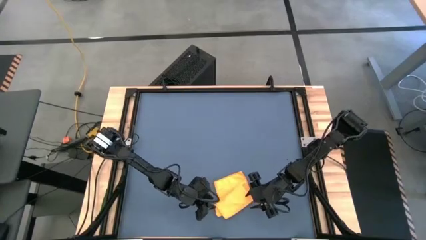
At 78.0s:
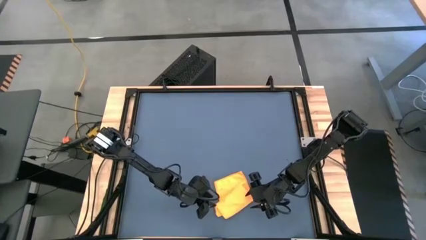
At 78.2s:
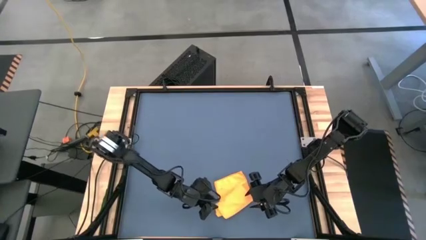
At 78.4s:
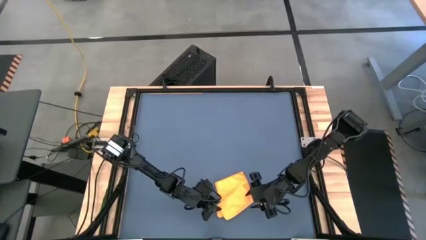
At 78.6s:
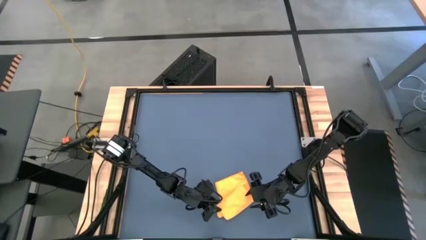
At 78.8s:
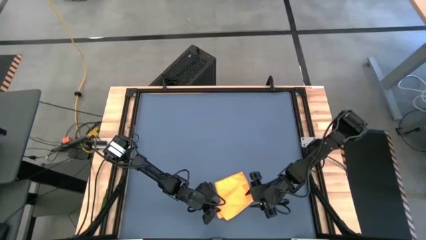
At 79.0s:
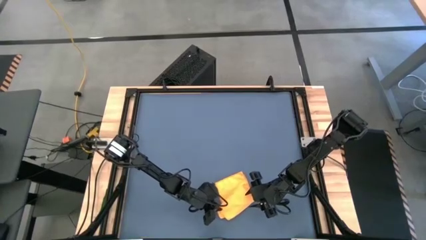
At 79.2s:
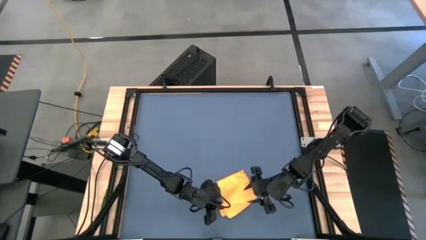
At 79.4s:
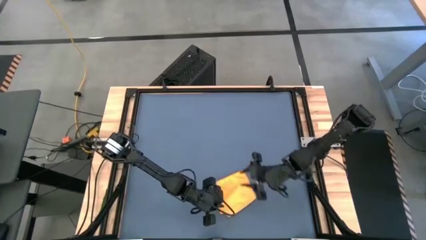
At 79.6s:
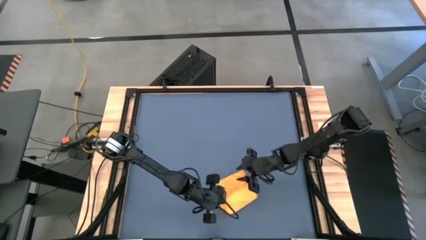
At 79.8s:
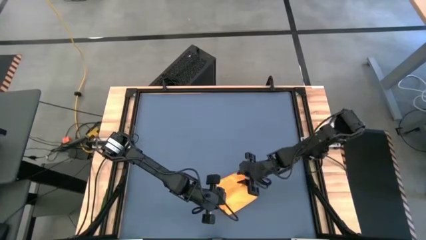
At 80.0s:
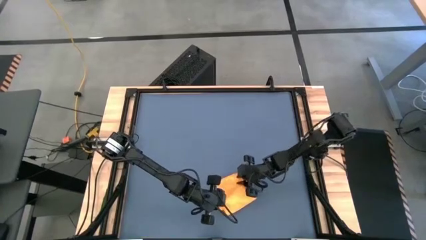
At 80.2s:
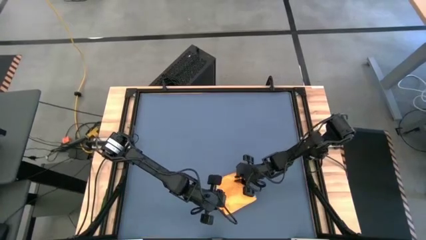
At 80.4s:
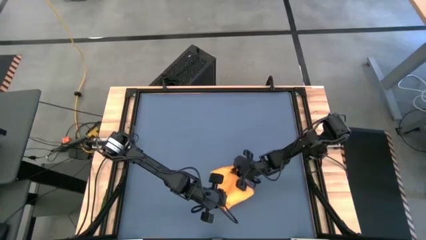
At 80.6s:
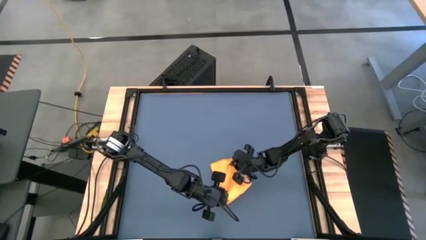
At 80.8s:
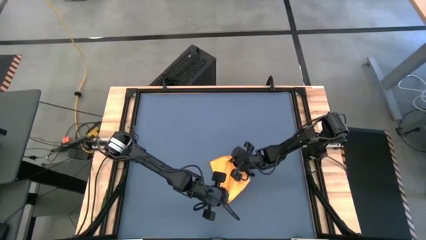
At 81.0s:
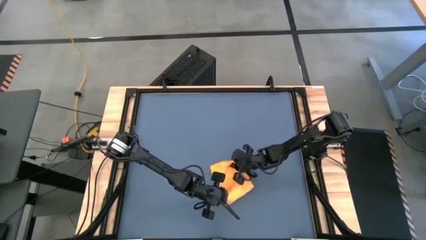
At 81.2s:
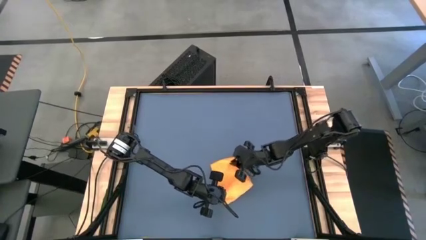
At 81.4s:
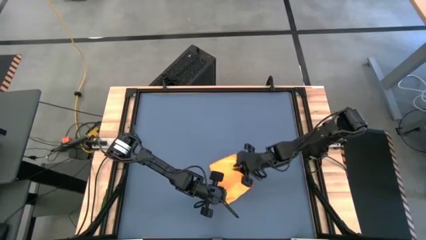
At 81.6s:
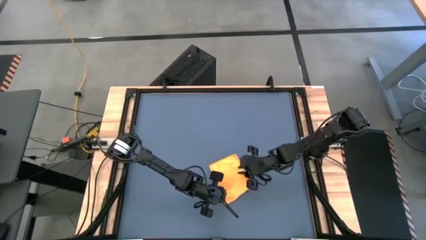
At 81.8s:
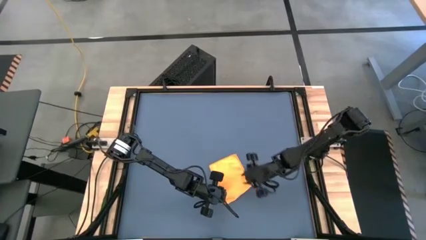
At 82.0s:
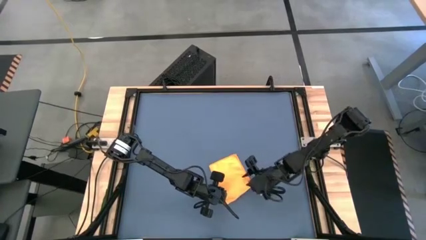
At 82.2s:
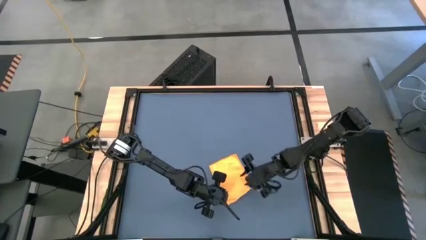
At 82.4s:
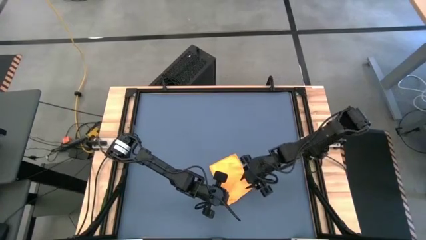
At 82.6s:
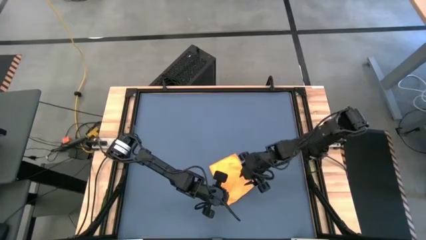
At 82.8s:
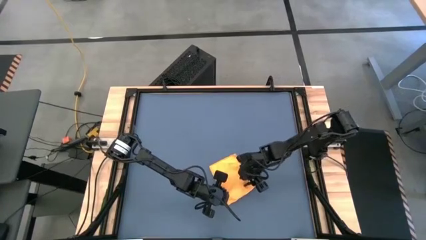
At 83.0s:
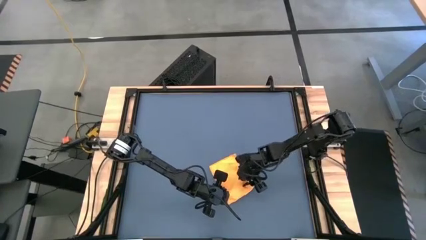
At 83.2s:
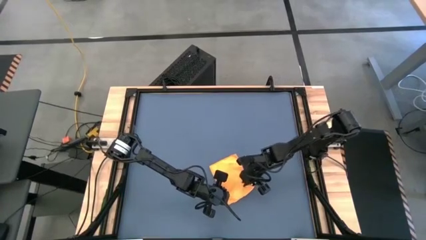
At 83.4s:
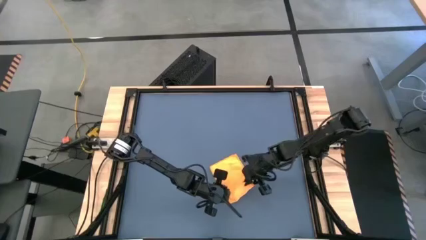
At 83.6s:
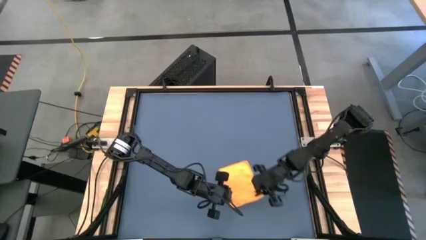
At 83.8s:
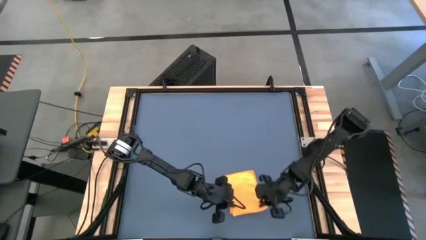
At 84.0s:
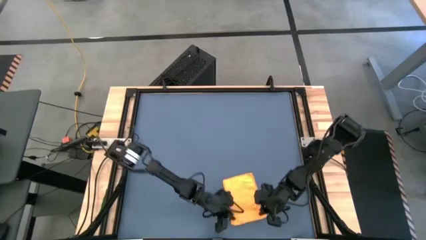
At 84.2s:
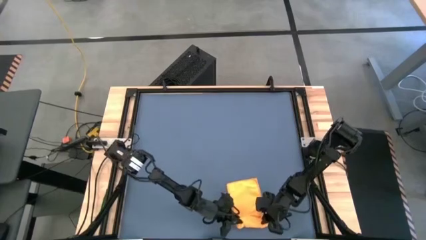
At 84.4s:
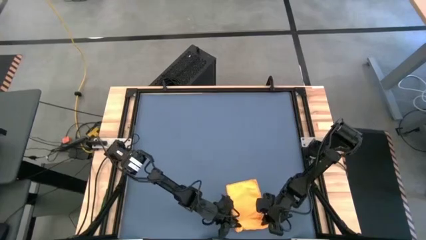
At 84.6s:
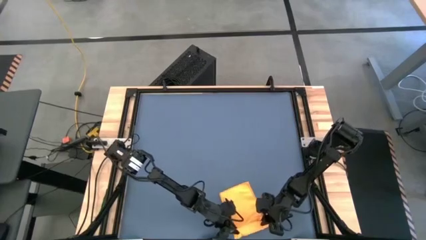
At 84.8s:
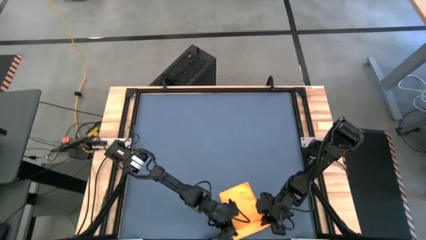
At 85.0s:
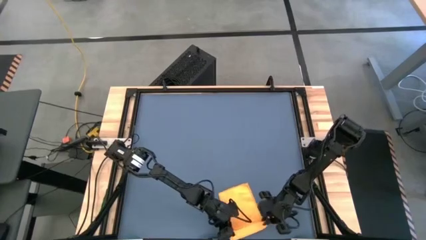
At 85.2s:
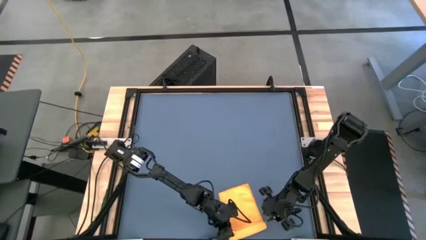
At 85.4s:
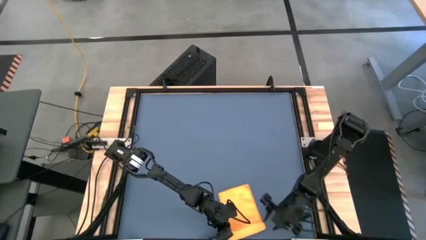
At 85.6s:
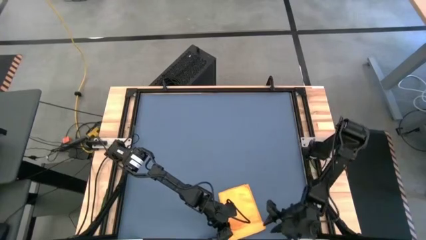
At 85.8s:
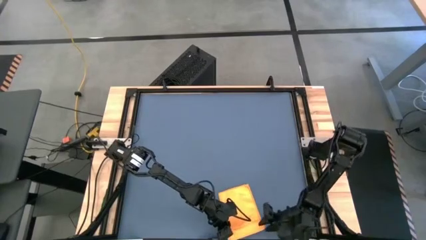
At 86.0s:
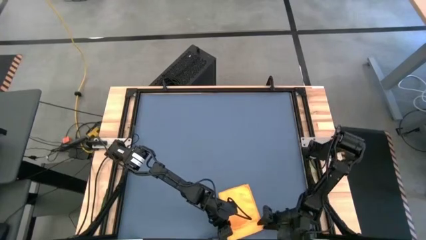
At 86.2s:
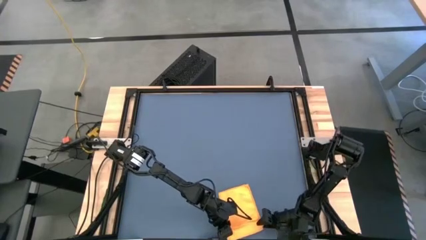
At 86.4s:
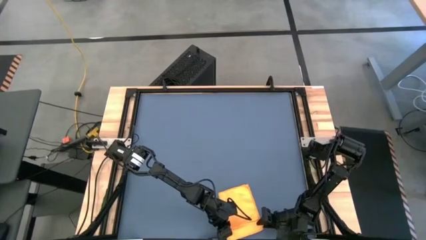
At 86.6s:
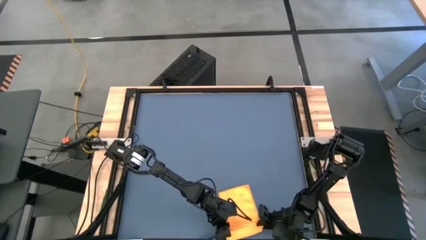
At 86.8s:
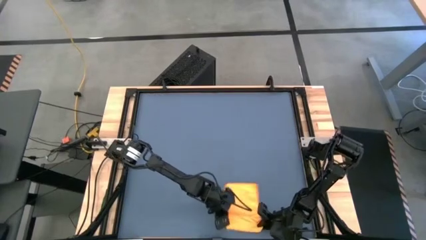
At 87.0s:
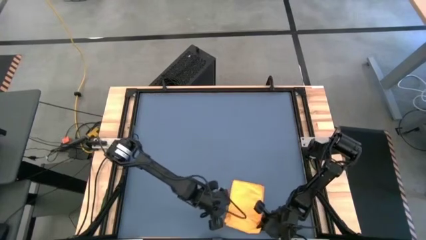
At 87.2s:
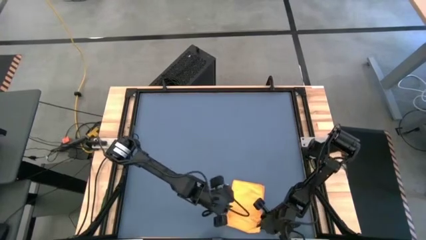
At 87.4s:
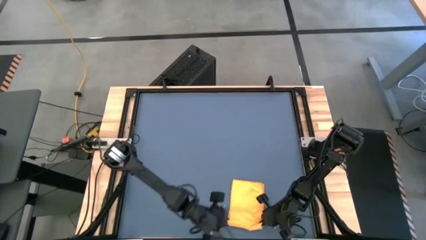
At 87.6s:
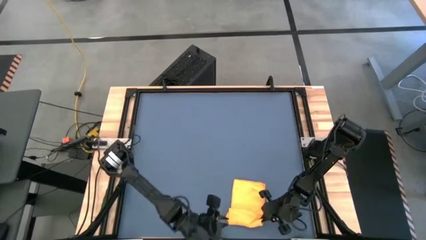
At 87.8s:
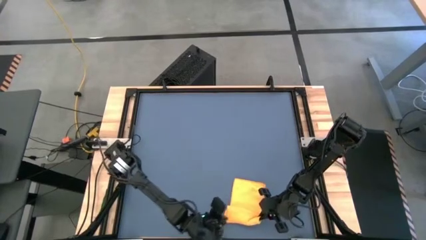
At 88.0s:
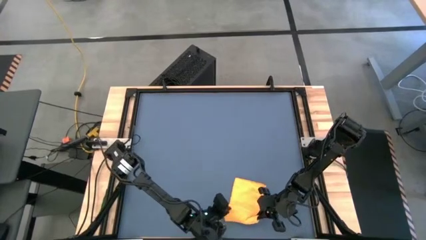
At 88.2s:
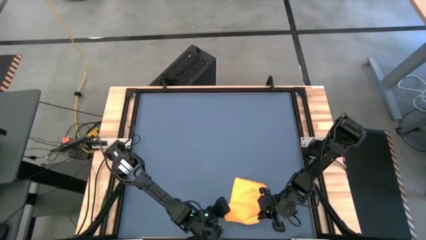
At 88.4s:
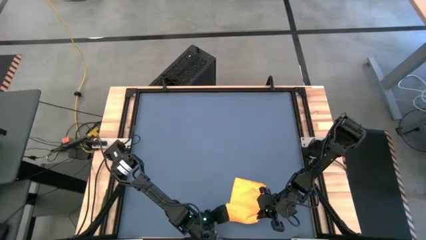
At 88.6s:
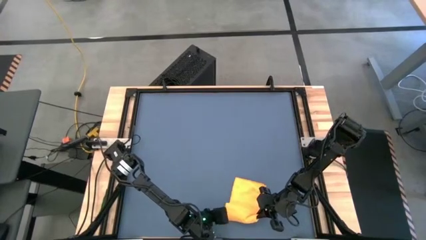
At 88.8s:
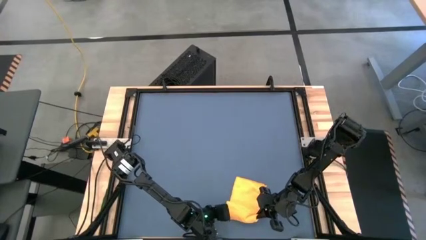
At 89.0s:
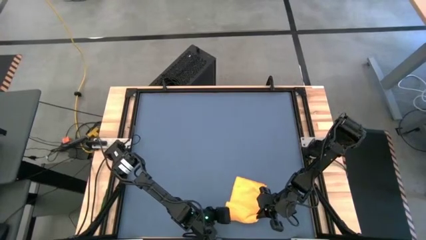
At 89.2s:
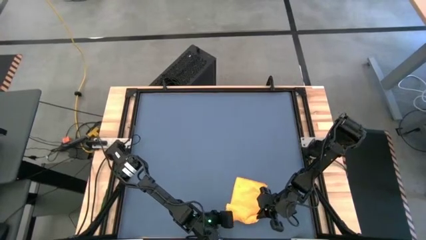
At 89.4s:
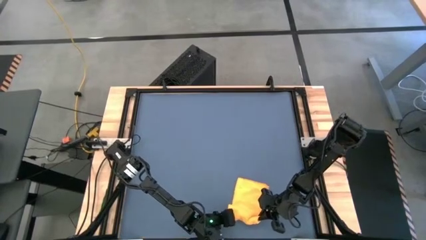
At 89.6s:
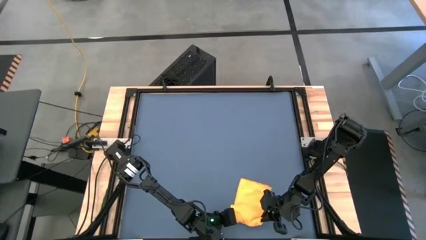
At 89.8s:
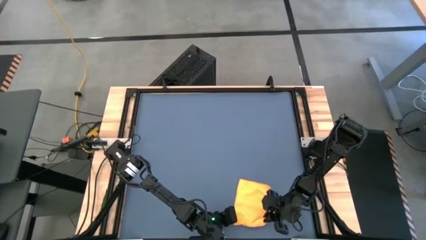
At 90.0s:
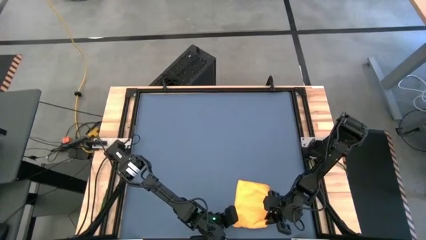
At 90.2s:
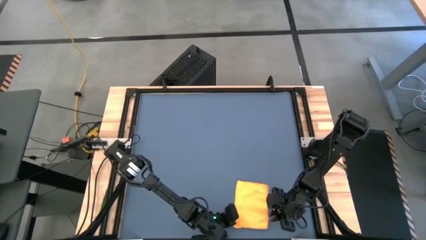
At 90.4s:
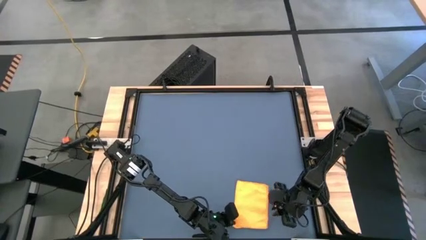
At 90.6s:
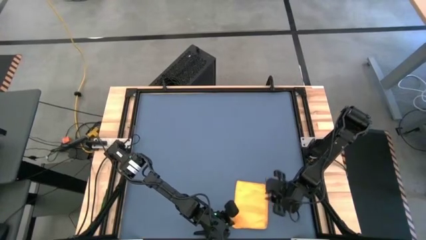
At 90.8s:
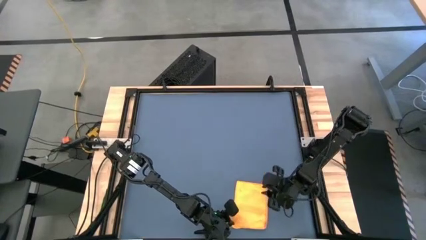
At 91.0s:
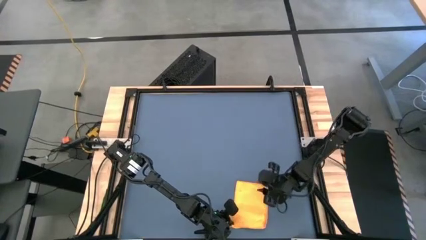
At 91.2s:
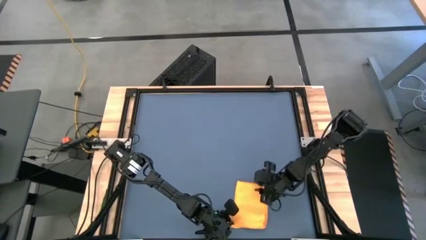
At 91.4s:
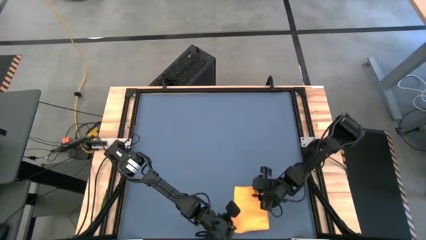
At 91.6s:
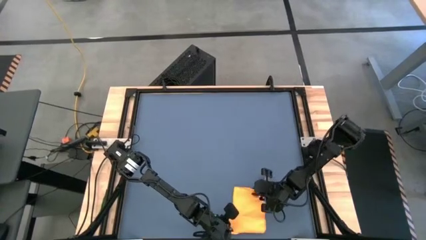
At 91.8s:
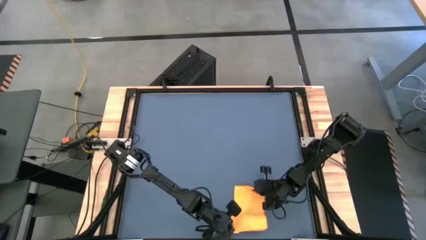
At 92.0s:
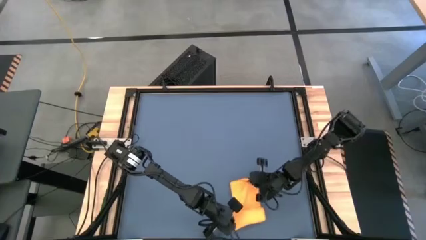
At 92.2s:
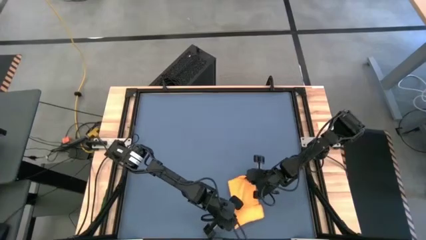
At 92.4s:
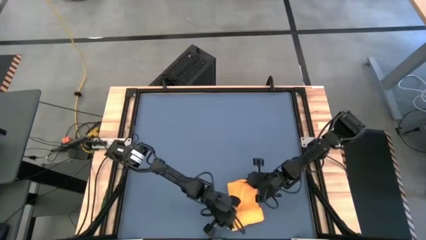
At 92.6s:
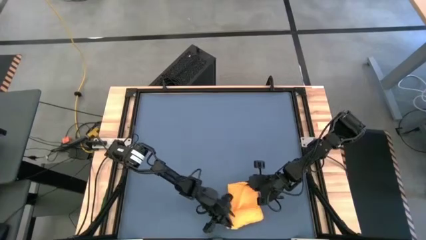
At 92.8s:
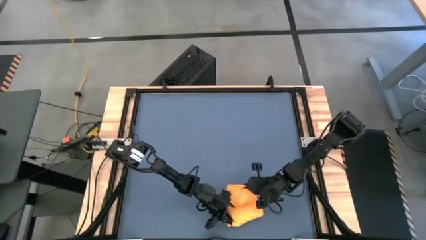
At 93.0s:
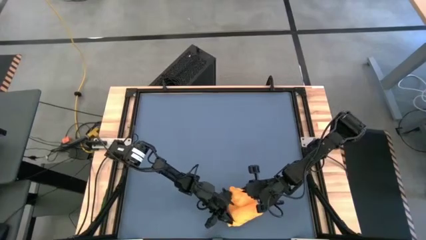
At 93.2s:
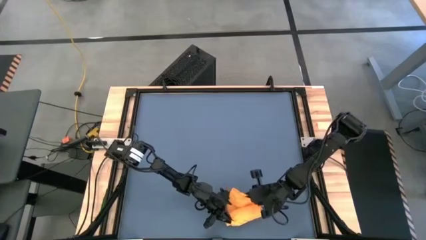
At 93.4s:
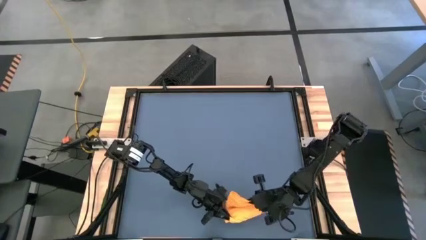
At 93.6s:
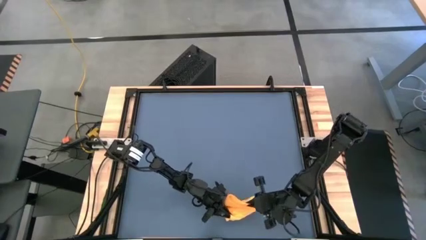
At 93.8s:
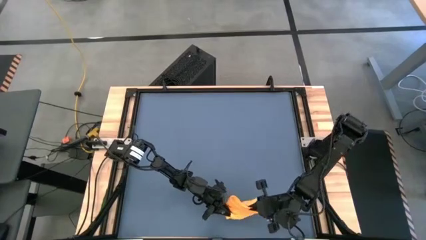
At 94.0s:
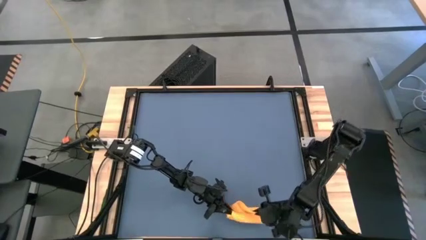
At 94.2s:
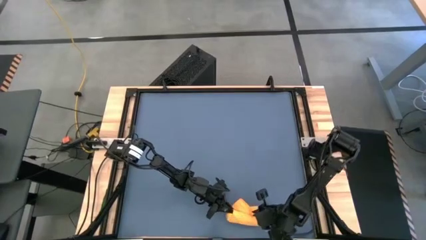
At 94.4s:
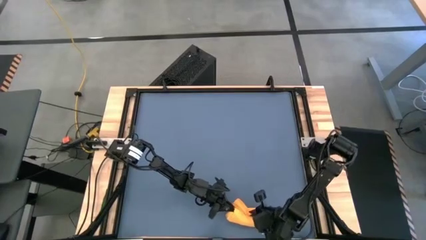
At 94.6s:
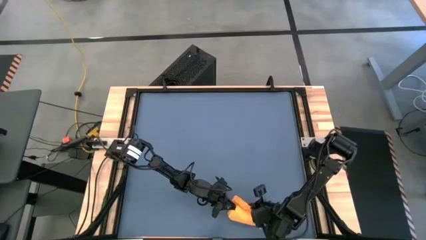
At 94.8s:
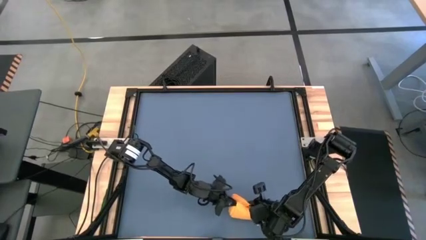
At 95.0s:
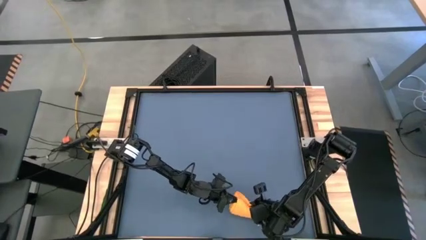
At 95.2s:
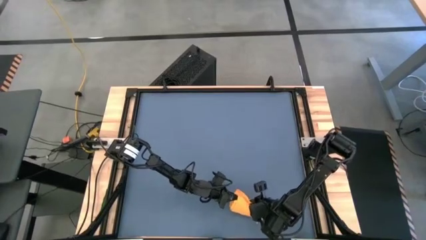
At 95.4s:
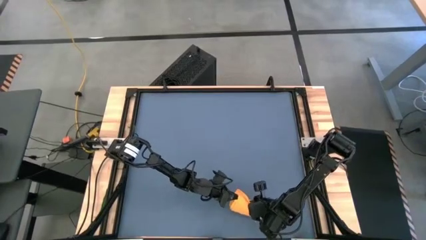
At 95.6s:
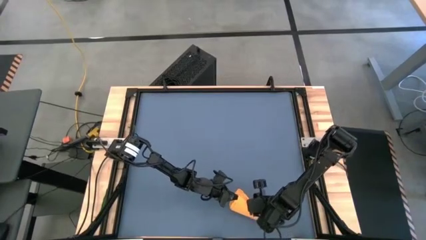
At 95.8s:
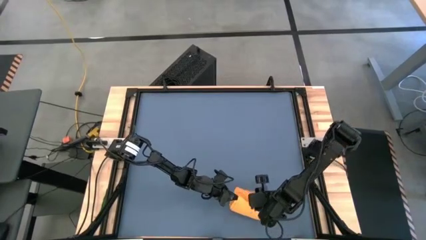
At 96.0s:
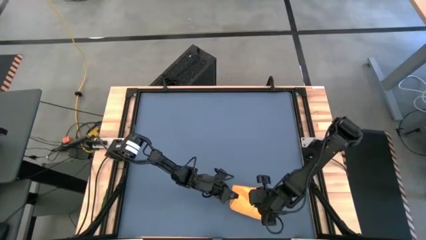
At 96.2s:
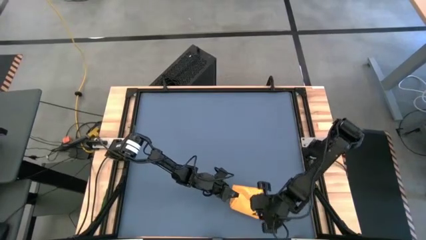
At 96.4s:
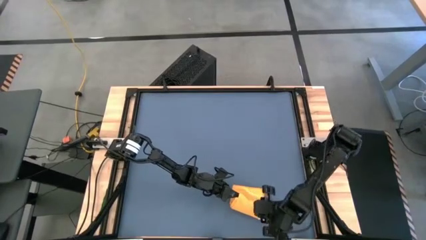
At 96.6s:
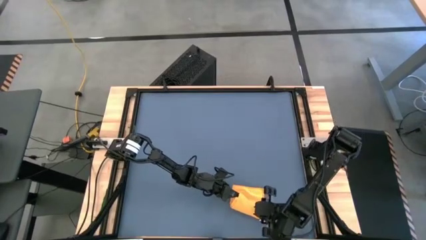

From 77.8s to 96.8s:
Task: Roll towel
Roll the yellow microfiber towel
